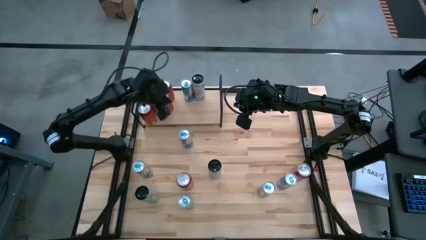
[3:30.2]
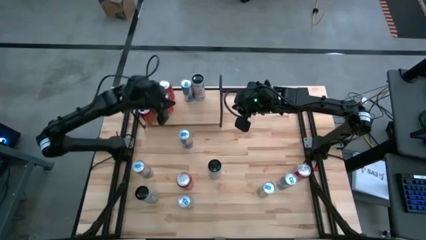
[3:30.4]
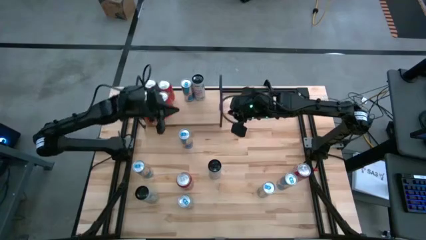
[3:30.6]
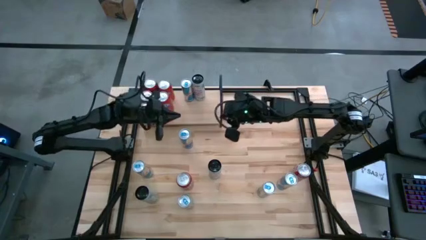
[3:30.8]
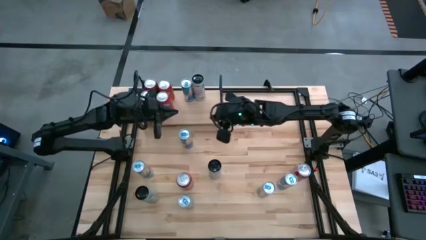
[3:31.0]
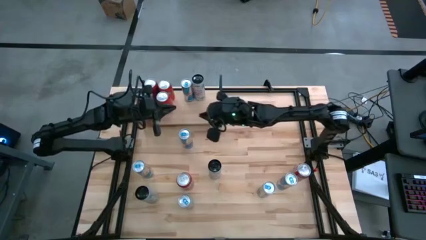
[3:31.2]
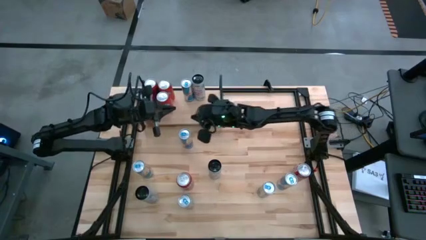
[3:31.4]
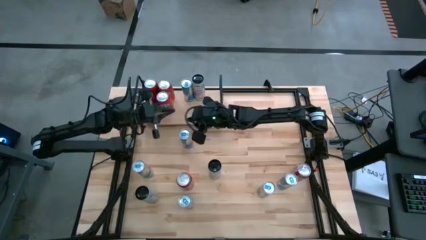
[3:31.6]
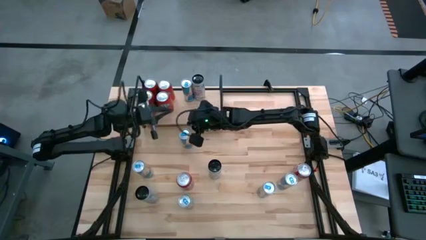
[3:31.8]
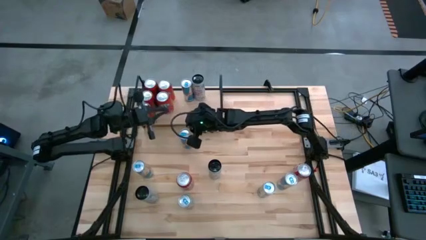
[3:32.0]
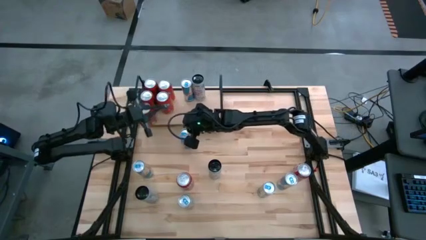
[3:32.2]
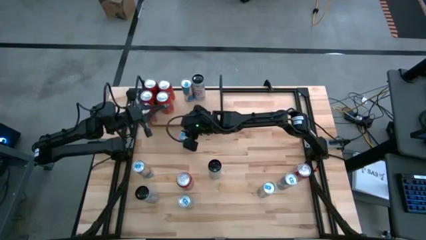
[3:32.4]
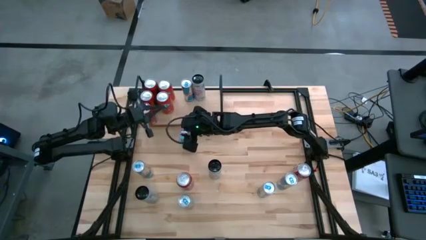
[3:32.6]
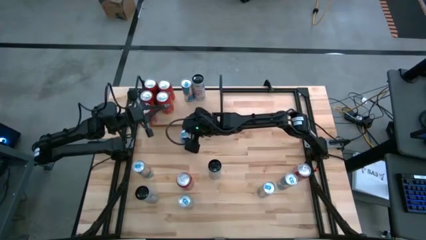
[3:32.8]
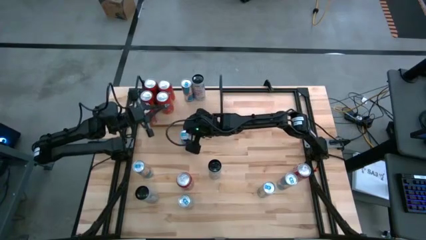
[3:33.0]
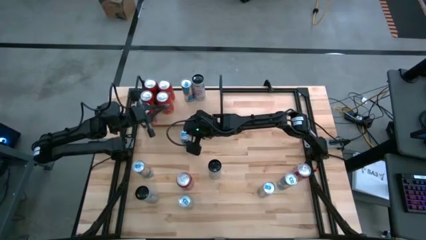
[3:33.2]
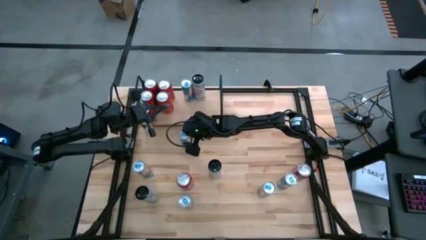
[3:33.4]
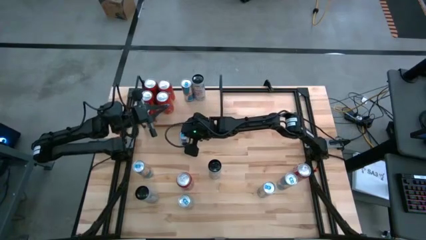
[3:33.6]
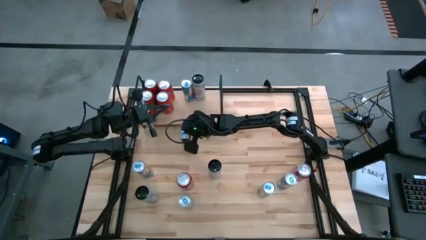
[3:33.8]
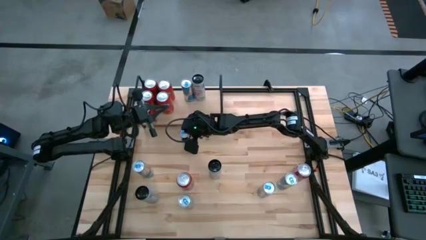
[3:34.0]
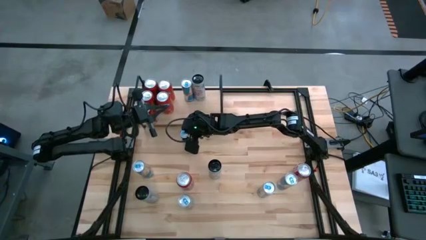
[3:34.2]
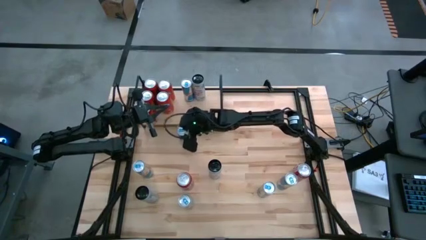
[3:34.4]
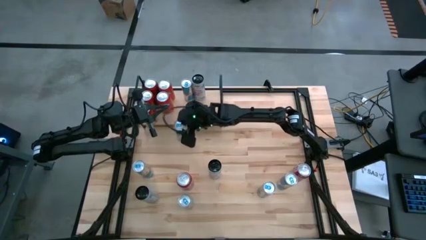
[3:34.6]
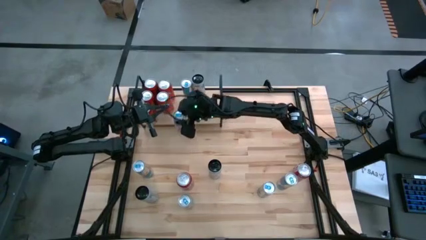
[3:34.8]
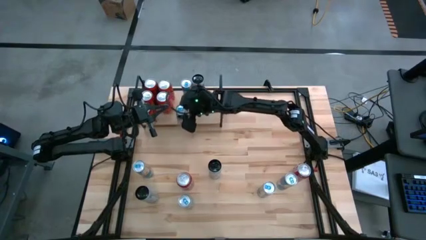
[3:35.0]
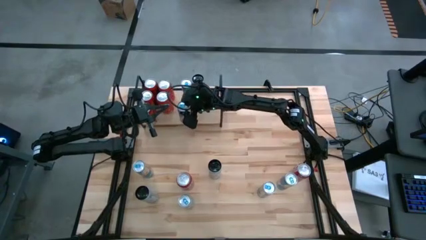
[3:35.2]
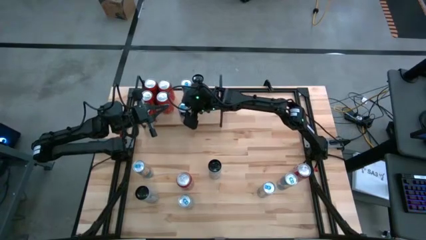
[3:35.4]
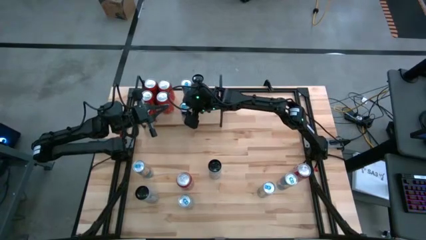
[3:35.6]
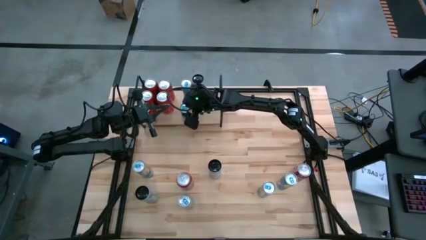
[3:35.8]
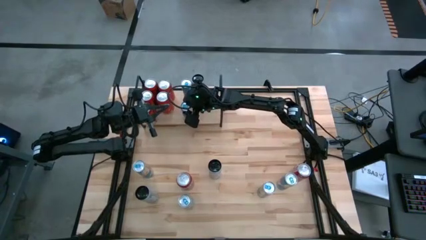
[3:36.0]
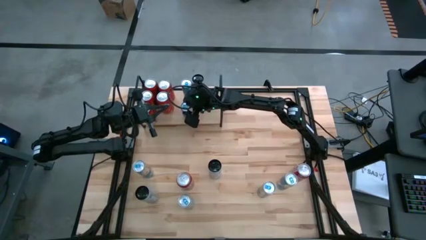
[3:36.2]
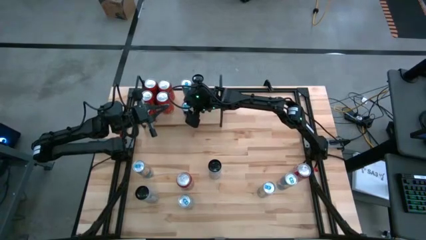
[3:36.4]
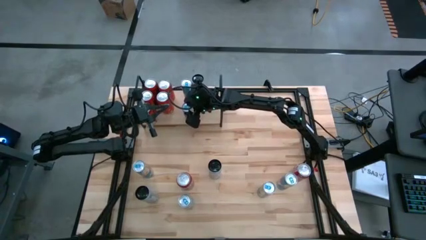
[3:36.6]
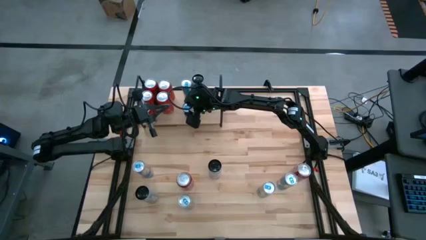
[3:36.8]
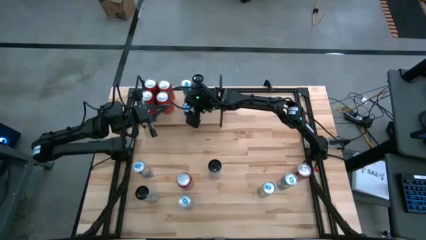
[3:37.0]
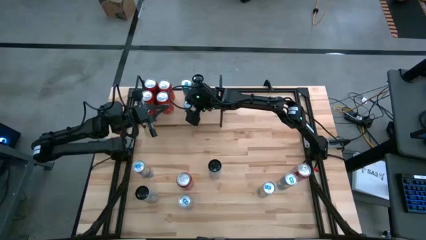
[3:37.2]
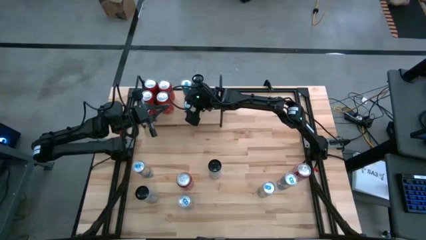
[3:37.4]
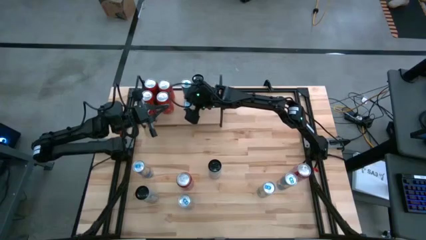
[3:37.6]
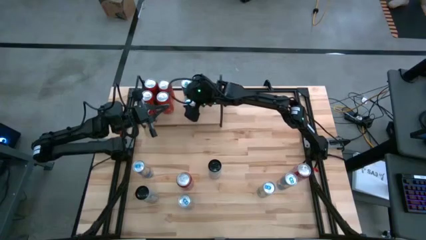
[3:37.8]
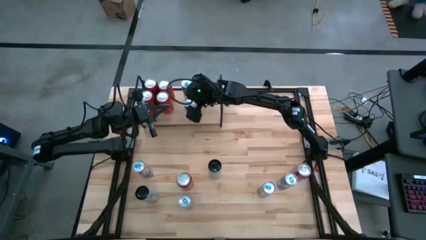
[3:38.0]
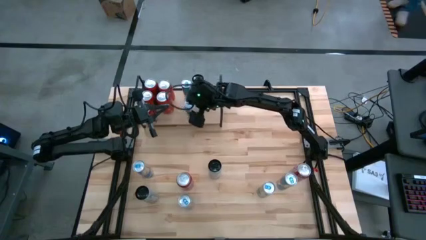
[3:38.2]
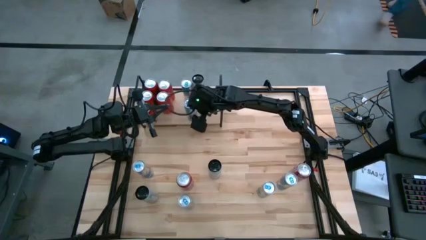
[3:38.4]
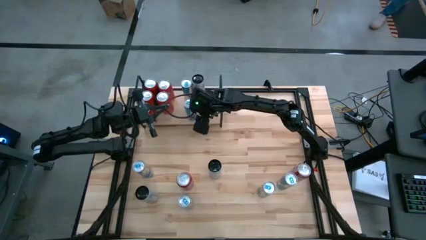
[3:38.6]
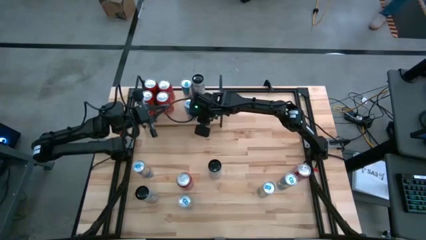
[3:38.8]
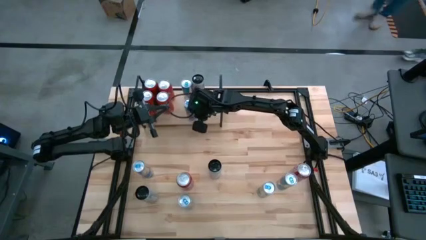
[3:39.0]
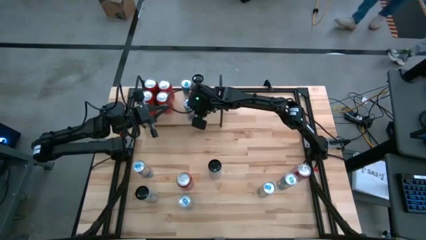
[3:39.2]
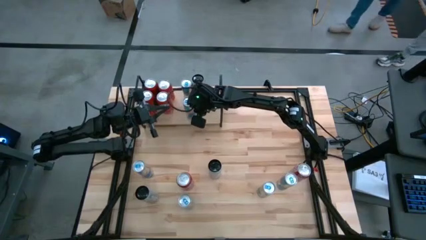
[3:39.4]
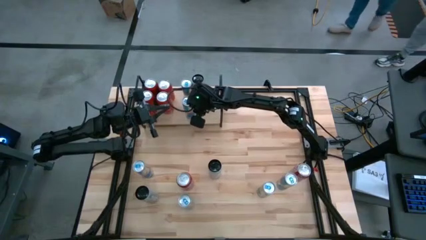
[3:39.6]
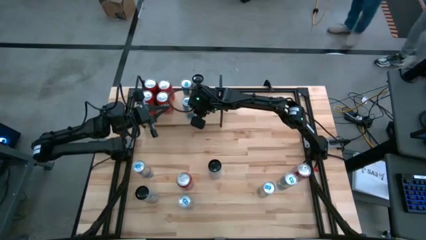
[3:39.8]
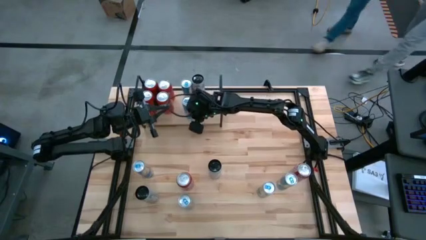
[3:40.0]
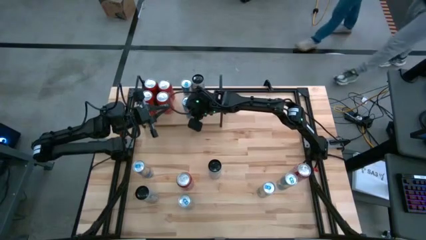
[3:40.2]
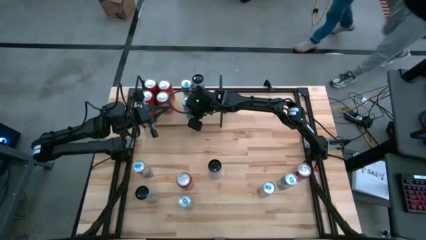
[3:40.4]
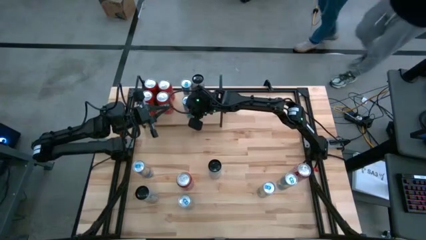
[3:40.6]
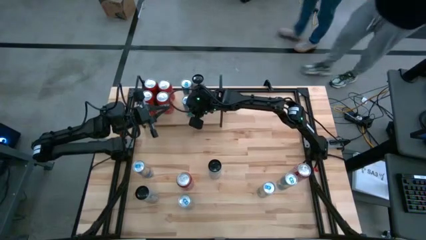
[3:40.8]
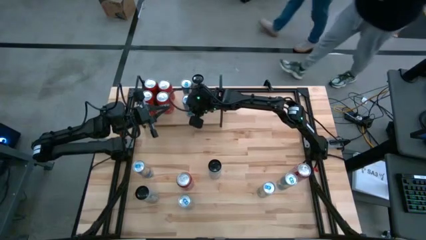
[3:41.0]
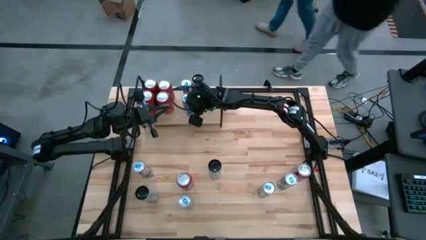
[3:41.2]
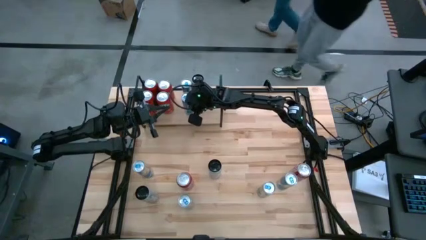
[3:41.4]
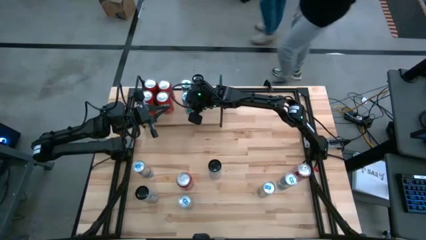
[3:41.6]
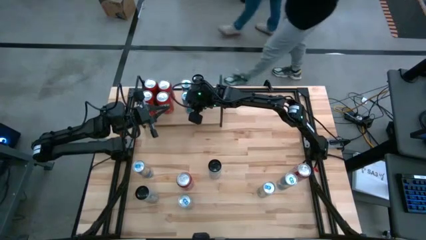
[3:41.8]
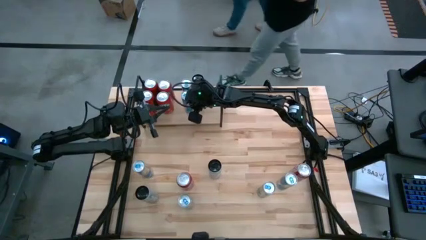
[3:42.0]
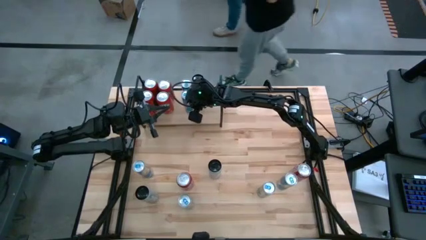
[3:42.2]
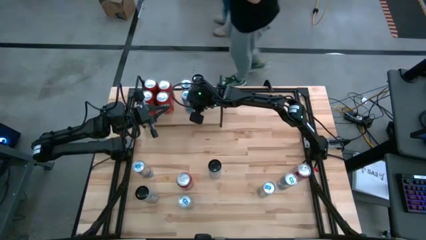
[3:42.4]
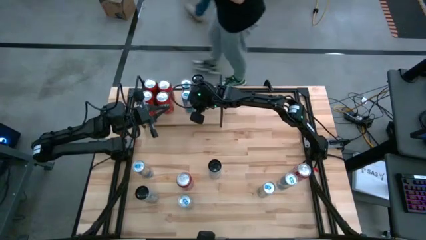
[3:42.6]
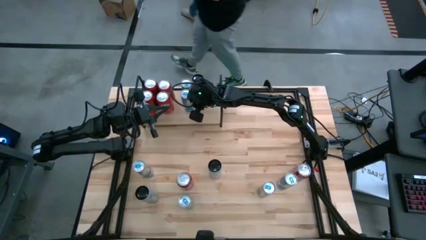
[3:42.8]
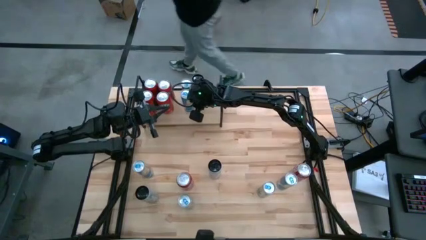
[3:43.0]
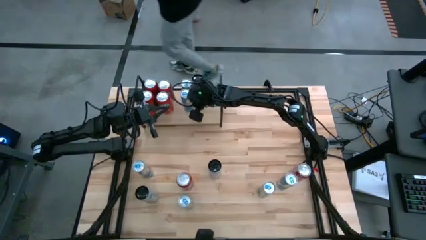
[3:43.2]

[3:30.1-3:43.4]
Task: Place canned beverage on shelf
Put the blue soda can on the shelf aligned with the other blue soda can
